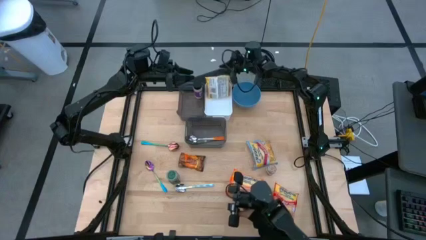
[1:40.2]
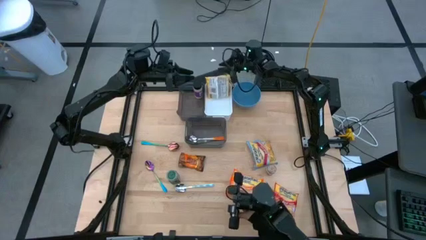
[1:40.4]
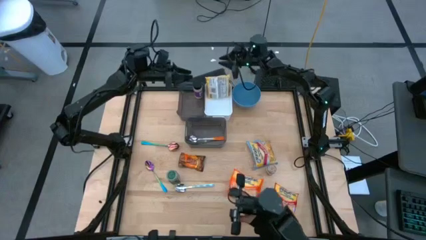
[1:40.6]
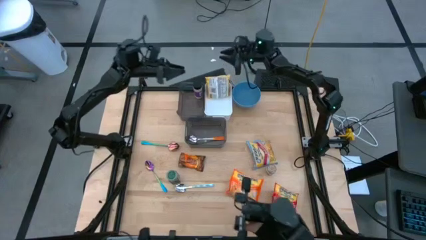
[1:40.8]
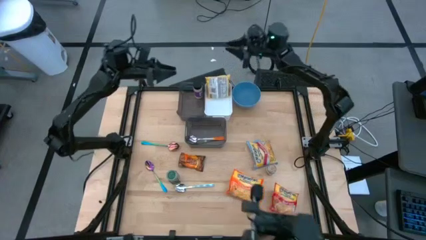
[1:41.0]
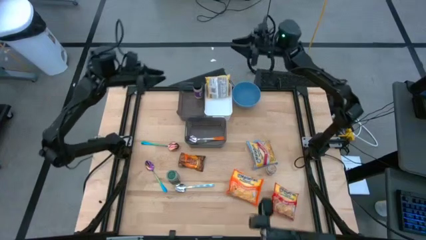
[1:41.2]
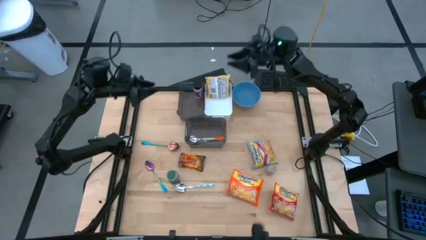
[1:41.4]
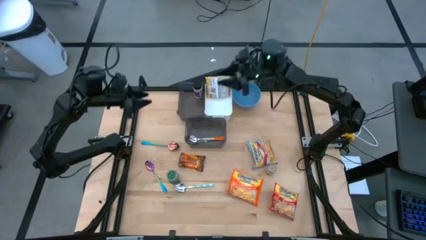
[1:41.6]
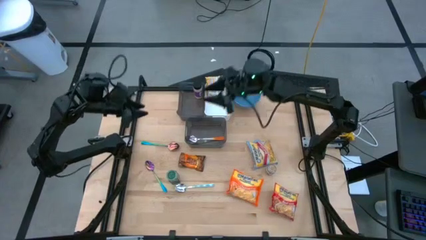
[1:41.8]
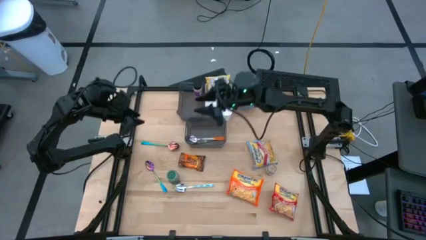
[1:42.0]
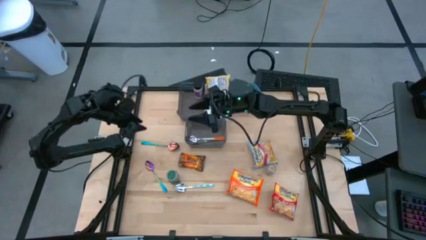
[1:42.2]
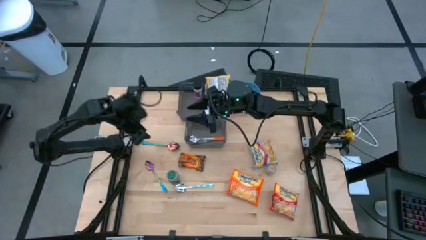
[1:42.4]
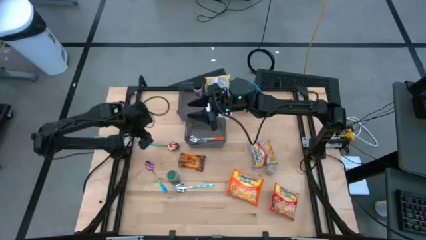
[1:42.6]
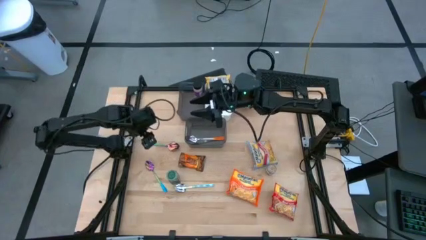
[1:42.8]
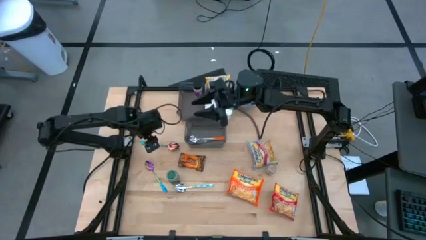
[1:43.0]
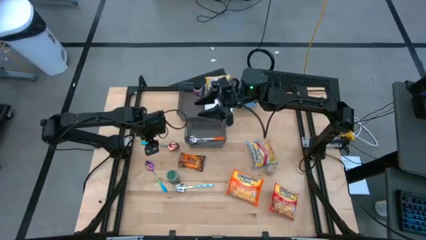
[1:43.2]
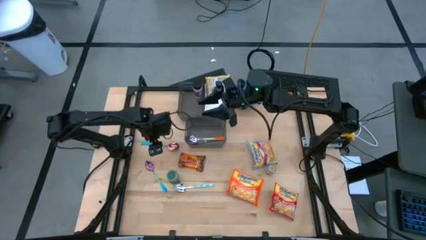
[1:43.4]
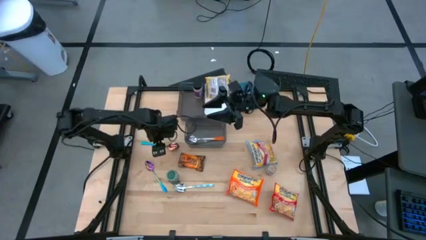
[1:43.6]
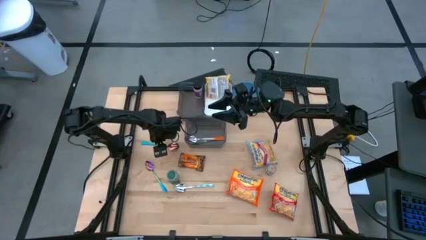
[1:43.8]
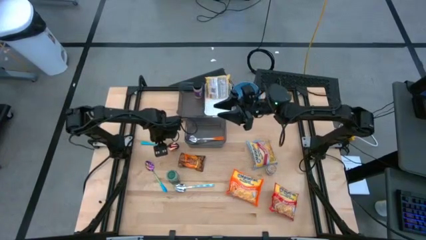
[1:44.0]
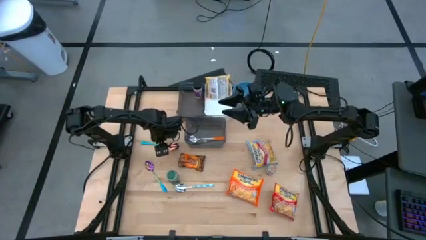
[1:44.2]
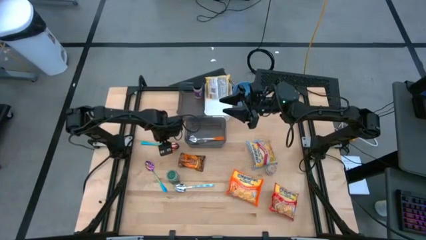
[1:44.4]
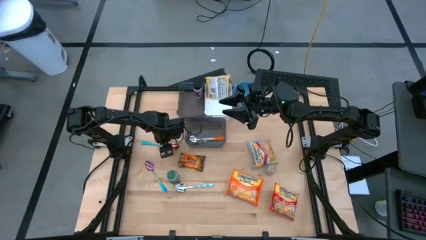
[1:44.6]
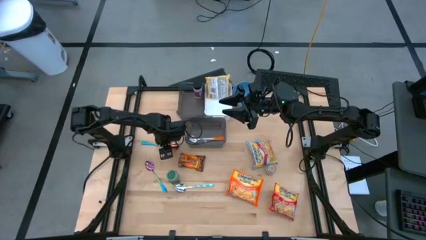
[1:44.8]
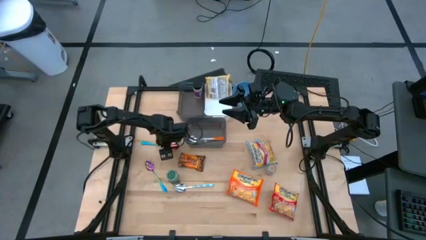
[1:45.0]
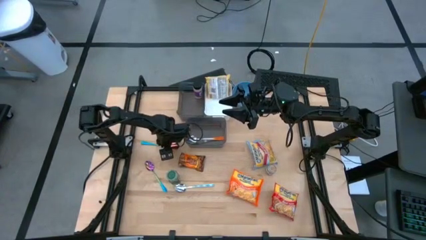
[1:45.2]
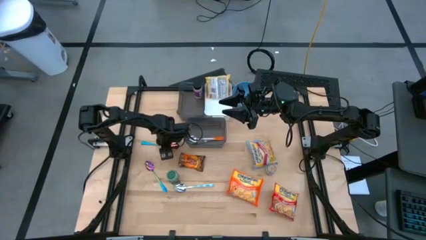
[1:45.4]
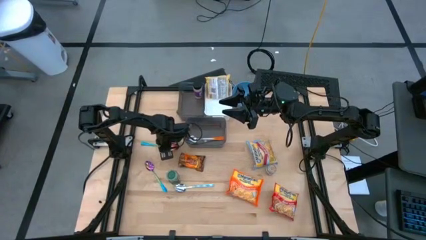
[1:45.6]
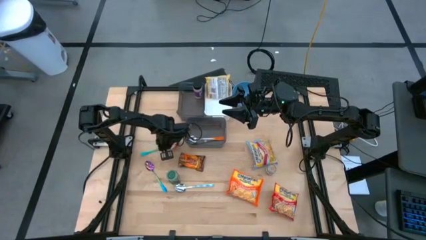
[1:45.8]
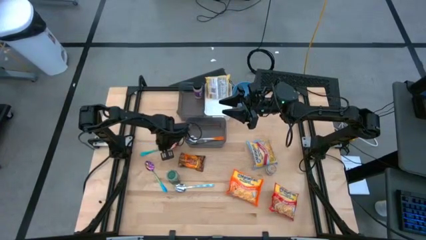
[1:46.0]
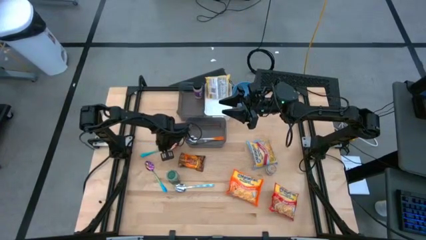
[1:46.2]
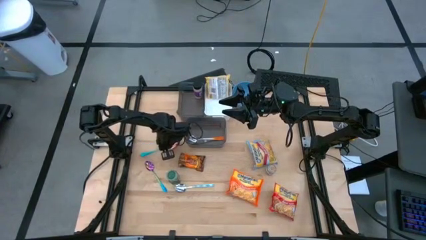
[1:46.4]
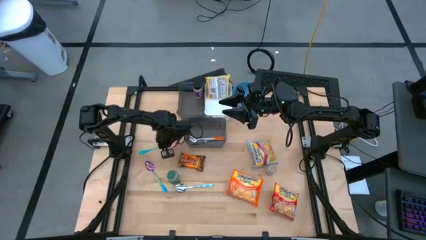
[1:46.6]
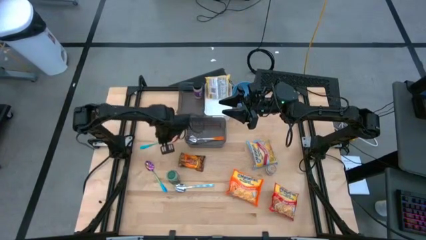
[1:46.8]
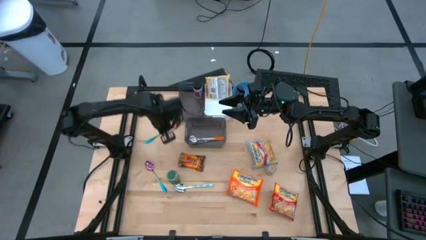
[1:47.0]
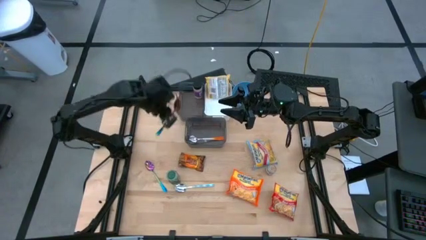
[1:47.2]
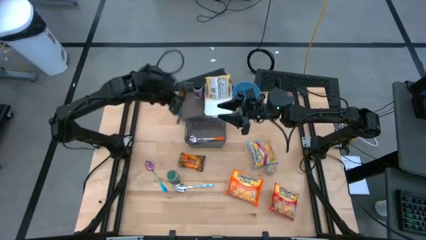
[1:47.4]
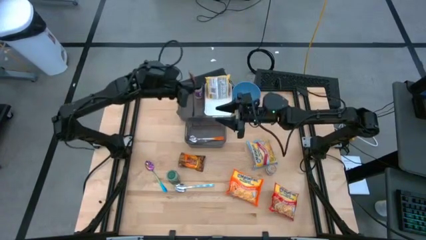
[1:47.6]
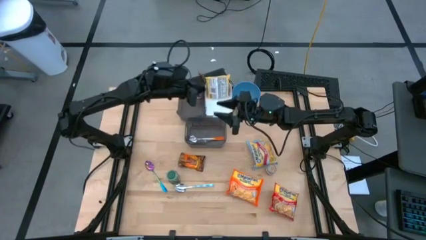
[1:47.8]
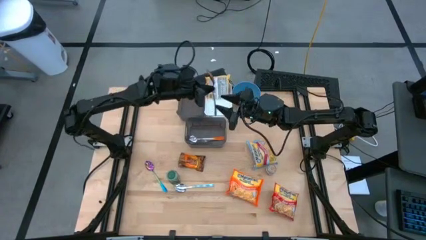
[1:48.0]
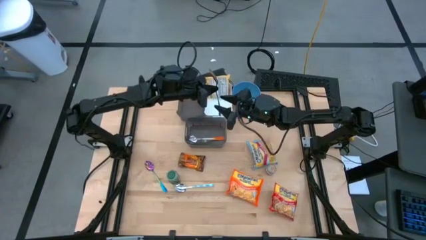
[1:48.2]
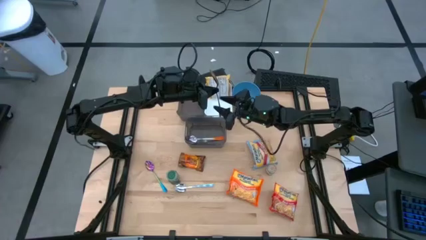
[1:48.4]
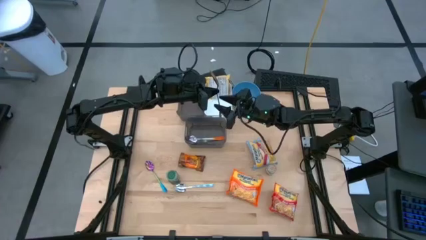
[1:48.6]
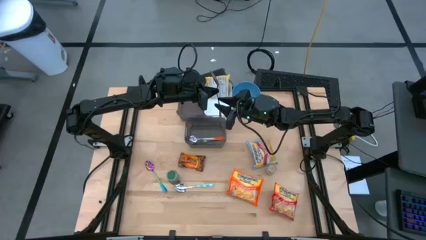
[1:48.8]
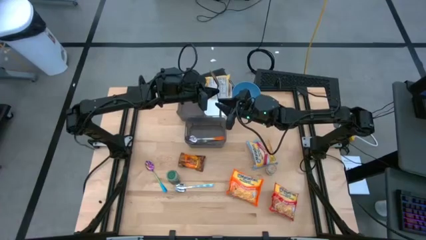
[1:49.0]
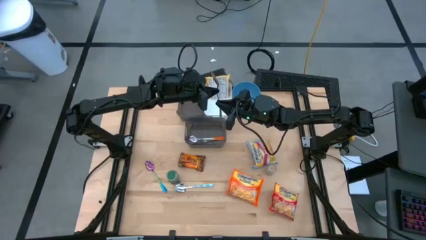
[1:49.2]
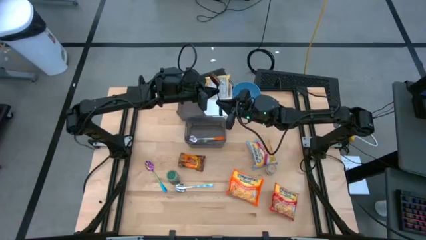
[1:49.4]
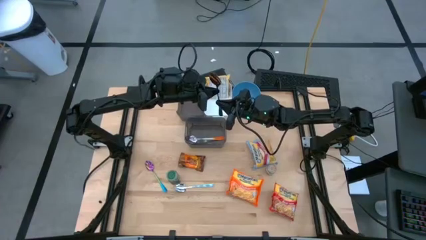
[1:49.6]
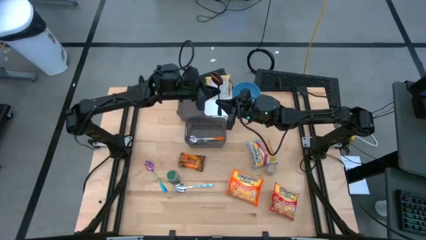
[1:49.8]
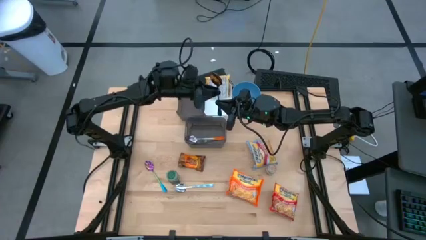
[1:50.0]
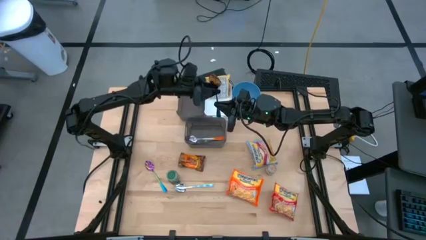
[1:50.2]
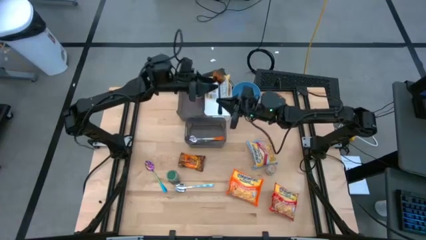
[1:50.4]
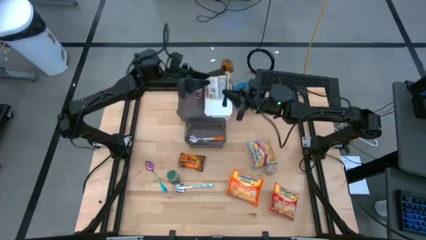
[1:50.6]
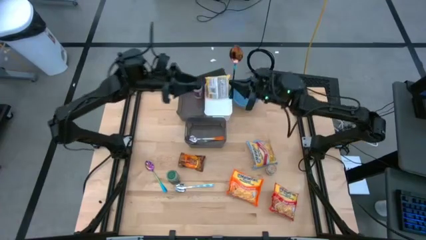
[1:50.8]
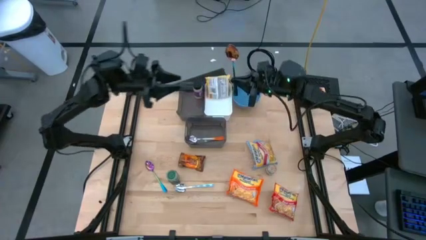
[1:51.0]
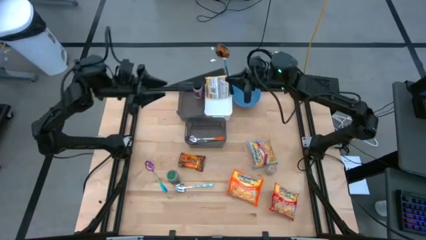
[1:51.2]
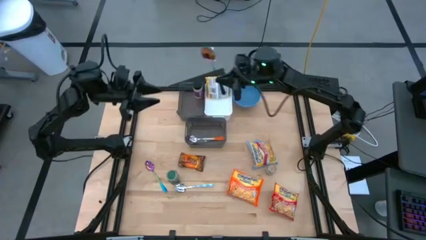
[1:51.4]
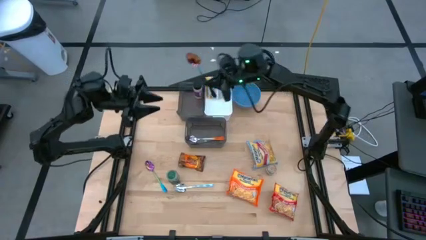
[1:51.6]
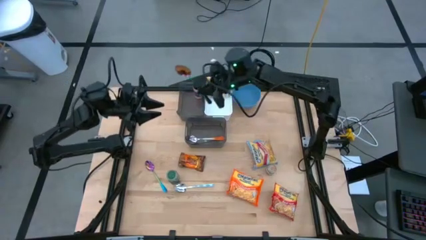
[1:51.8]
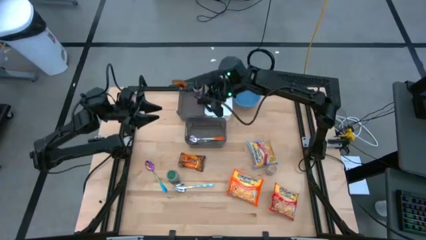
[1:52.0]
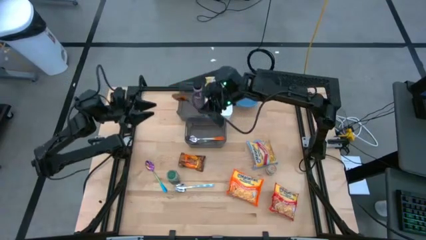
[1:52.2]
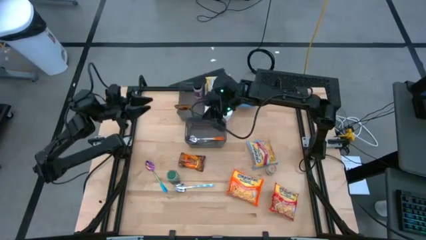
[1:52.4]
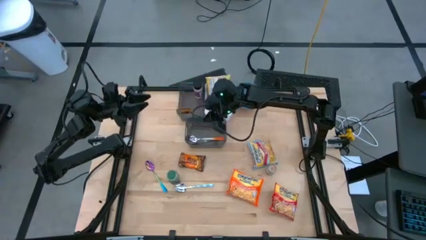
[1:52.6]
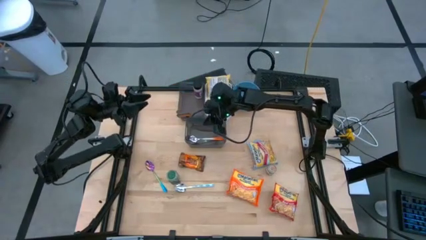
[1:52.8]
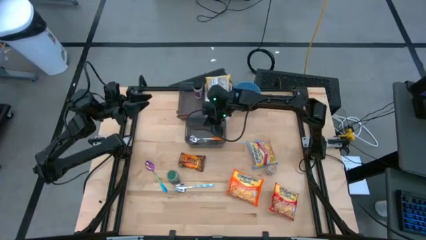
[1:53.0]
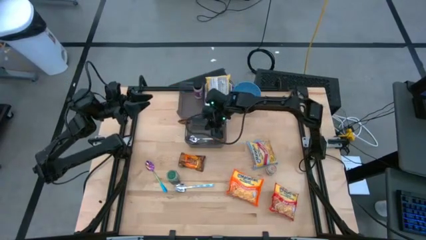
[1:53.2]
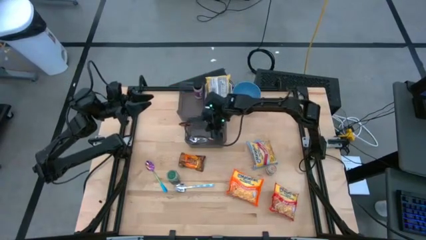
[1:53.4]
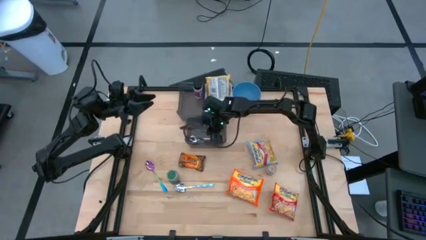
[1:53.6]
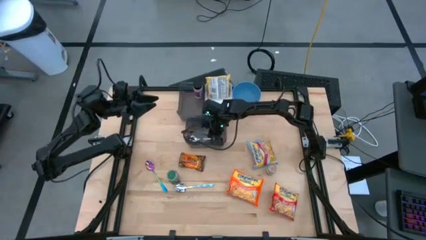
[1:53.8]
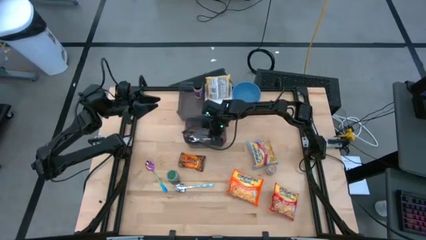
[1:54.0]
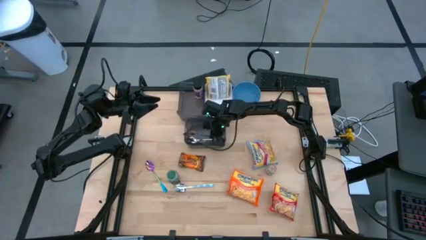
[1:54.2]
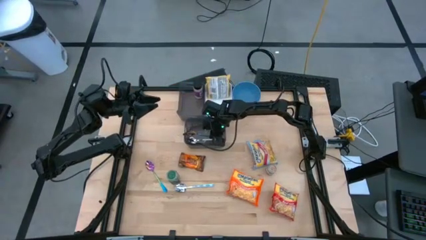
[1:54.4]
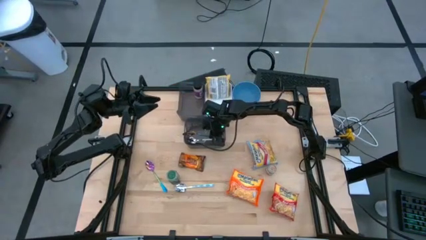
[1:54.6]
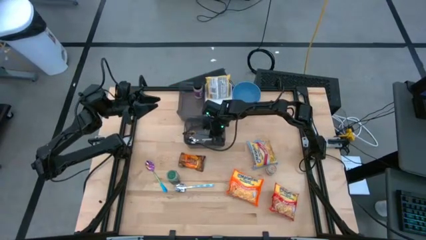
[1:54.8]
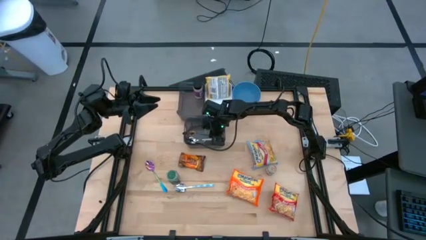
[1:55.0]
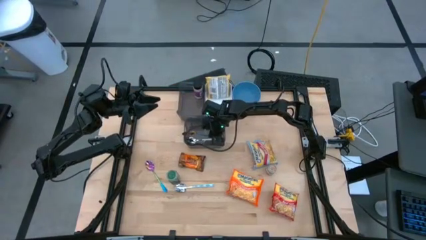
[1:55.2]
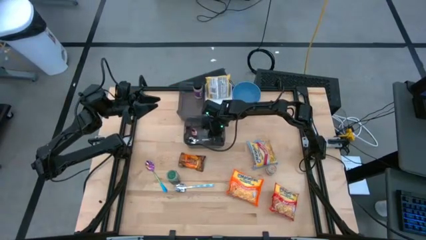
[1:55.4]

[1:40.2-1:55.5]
Task: Pick & Place Food Item
Put the top blue spoon into the bottom black bin
